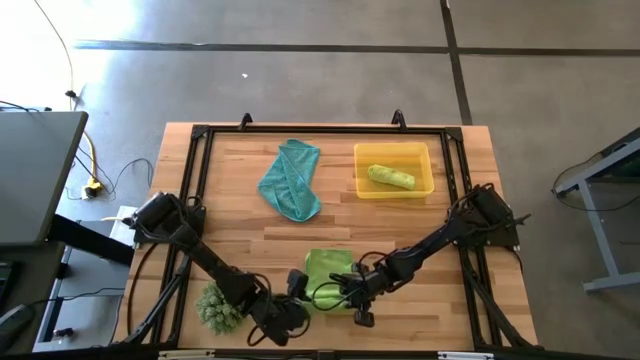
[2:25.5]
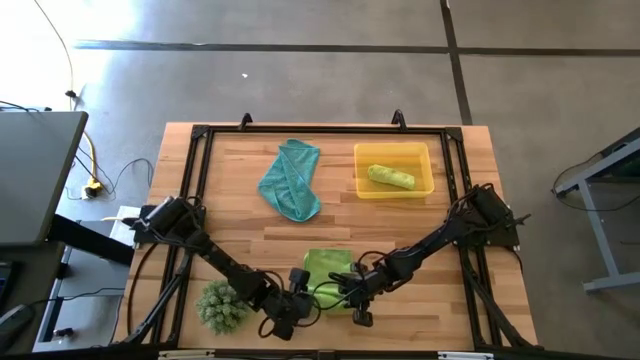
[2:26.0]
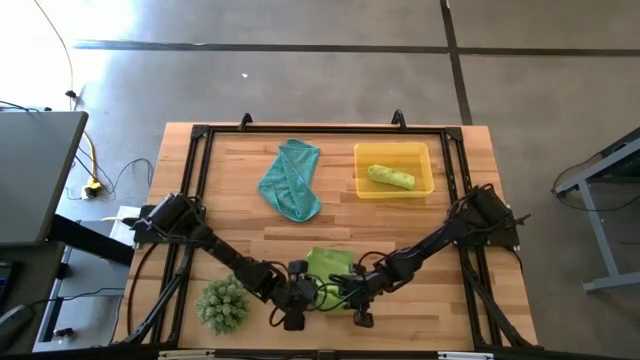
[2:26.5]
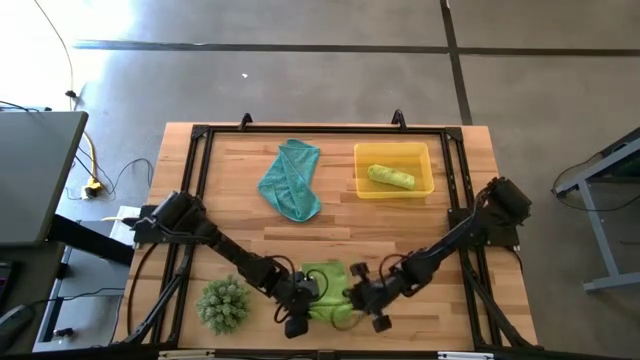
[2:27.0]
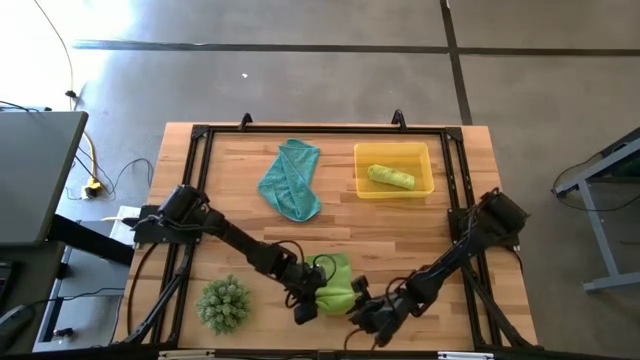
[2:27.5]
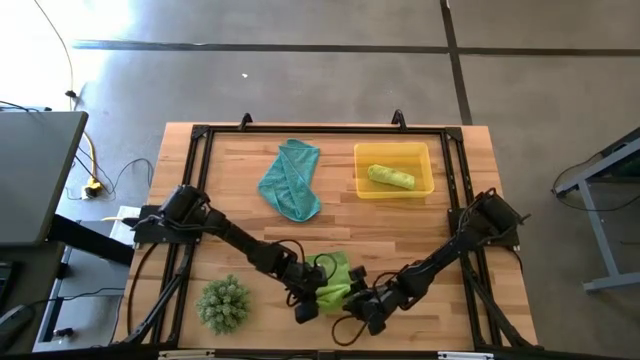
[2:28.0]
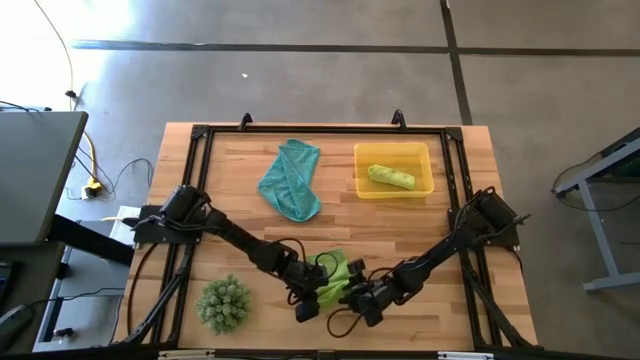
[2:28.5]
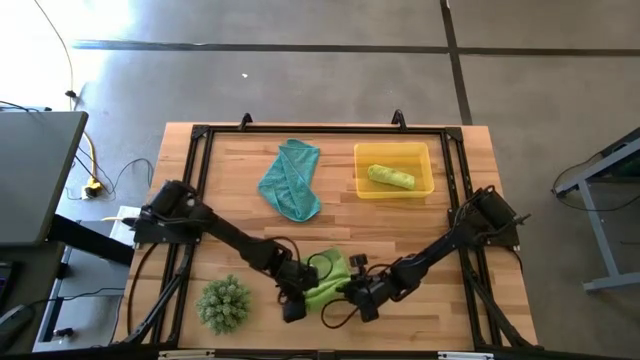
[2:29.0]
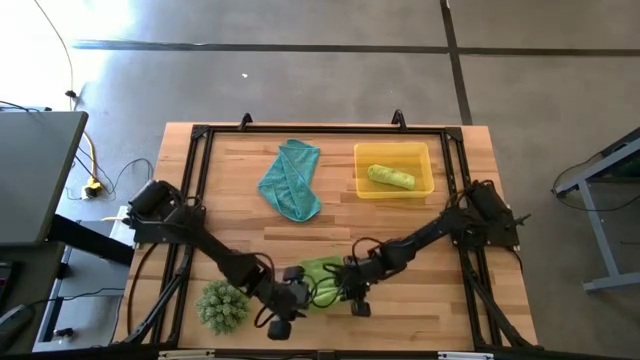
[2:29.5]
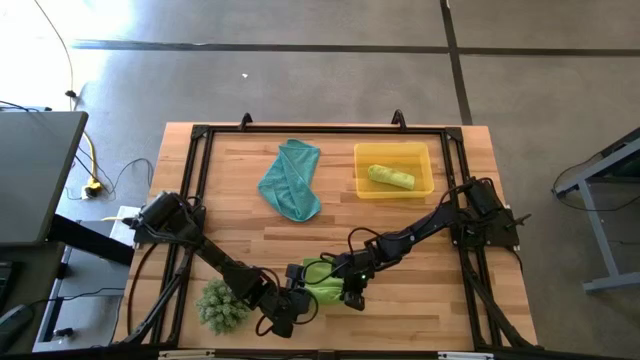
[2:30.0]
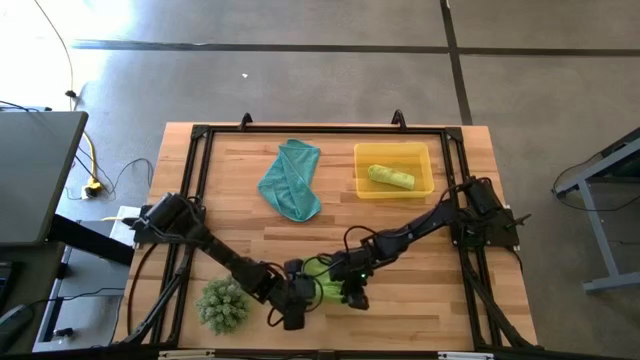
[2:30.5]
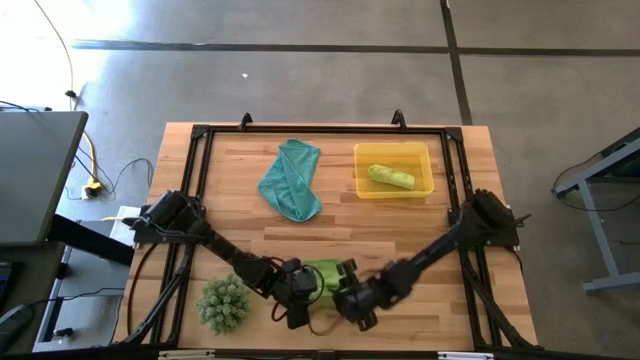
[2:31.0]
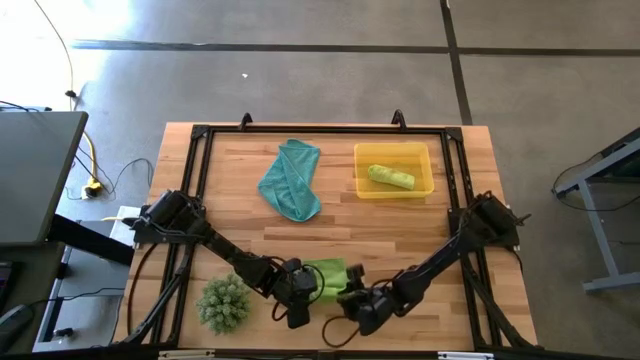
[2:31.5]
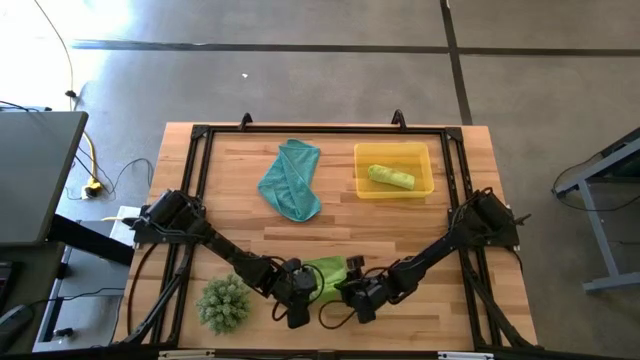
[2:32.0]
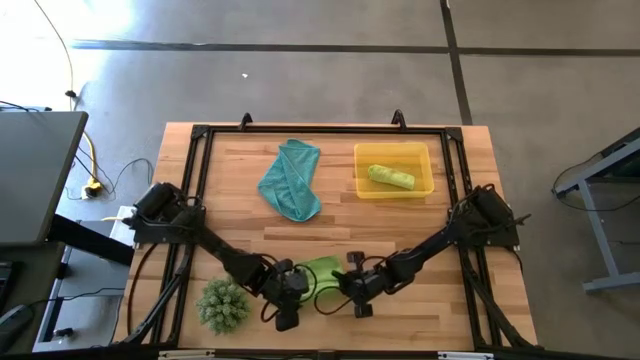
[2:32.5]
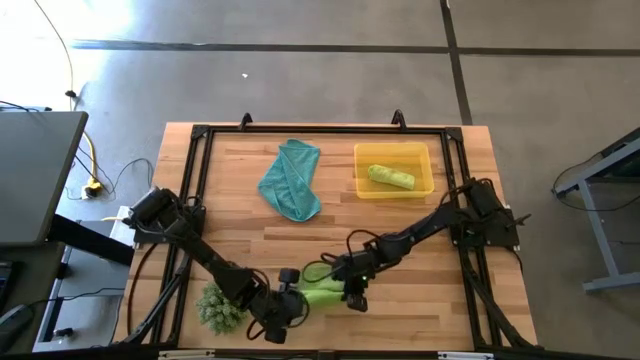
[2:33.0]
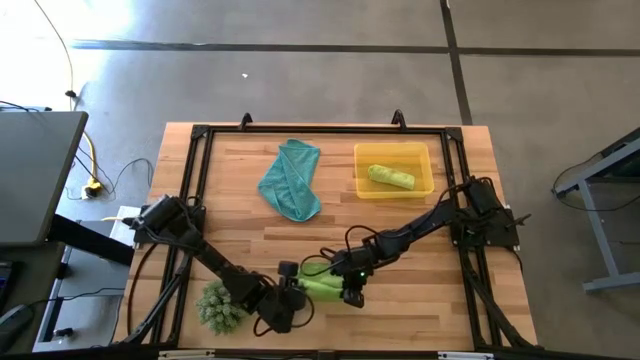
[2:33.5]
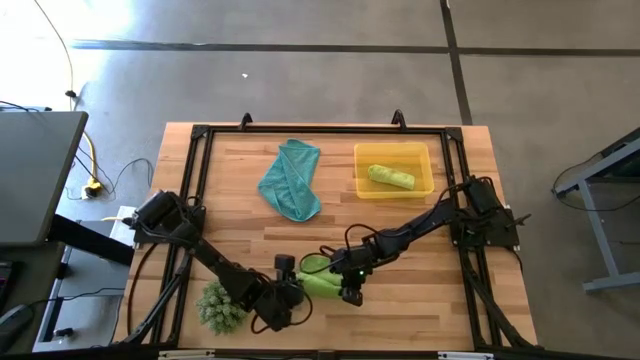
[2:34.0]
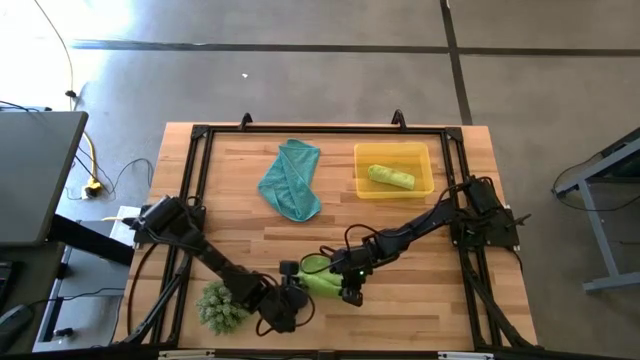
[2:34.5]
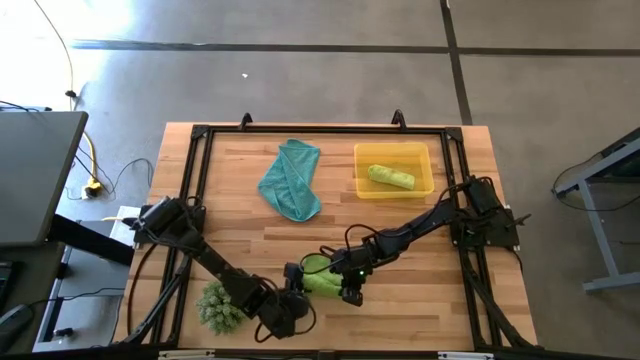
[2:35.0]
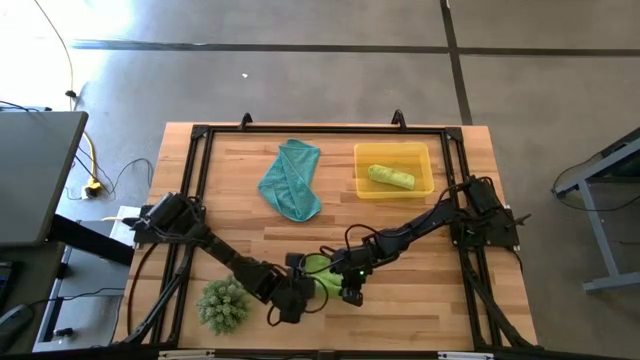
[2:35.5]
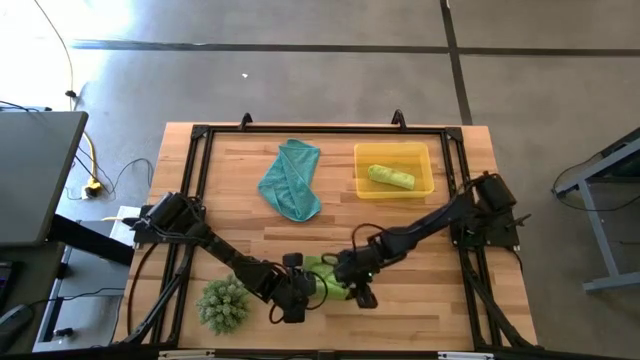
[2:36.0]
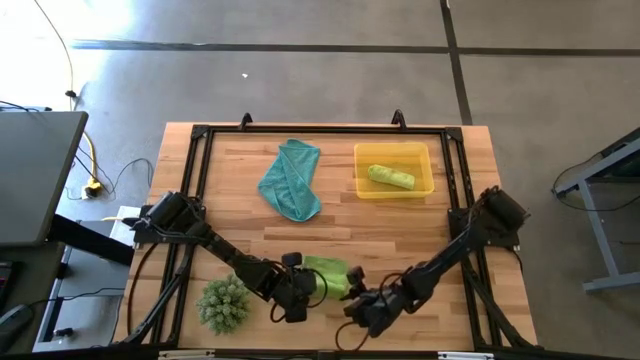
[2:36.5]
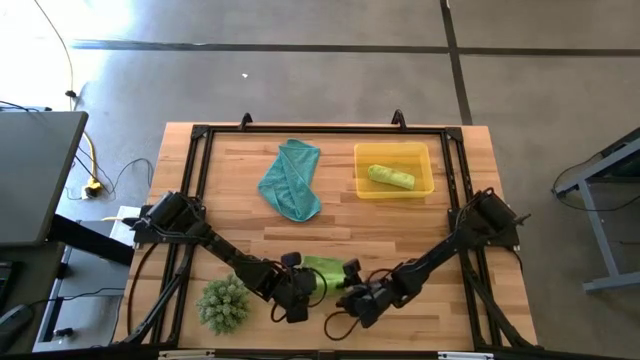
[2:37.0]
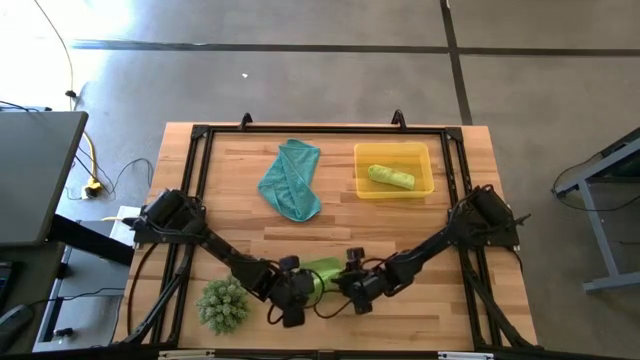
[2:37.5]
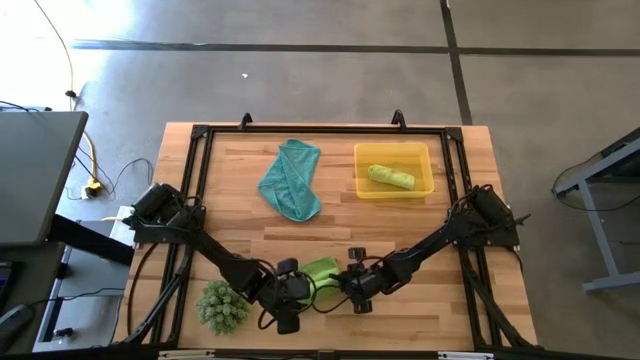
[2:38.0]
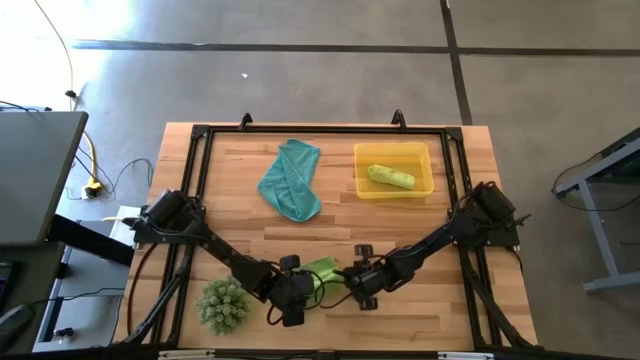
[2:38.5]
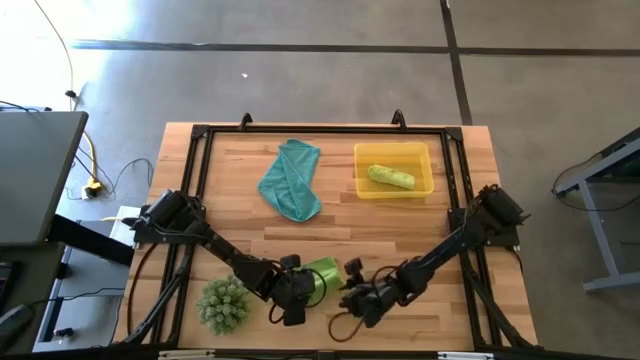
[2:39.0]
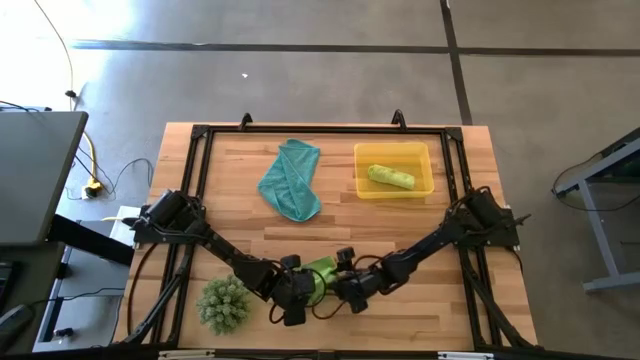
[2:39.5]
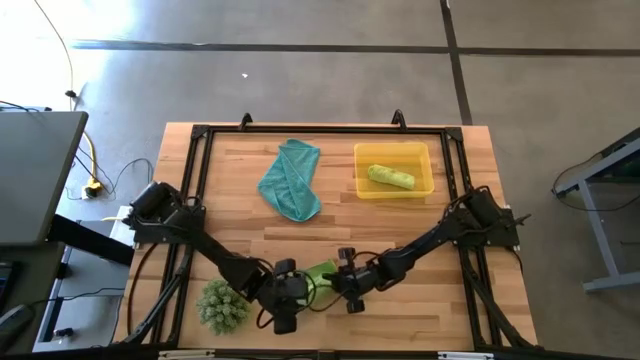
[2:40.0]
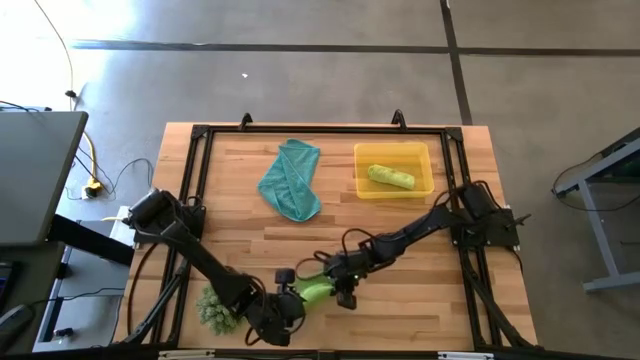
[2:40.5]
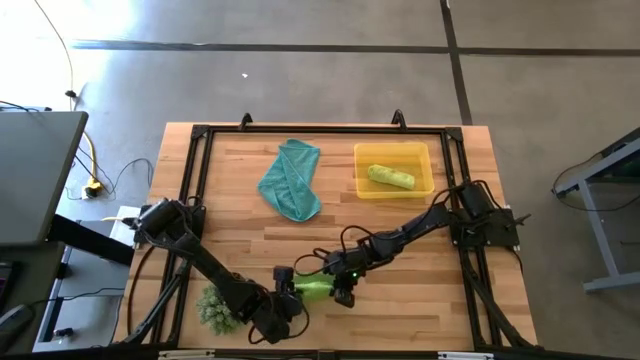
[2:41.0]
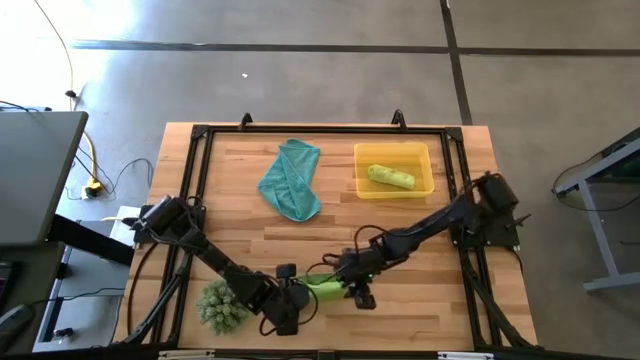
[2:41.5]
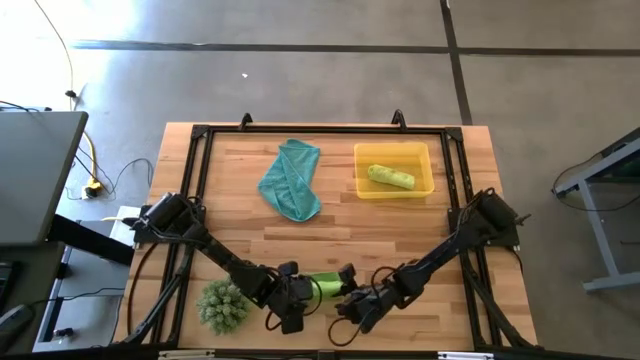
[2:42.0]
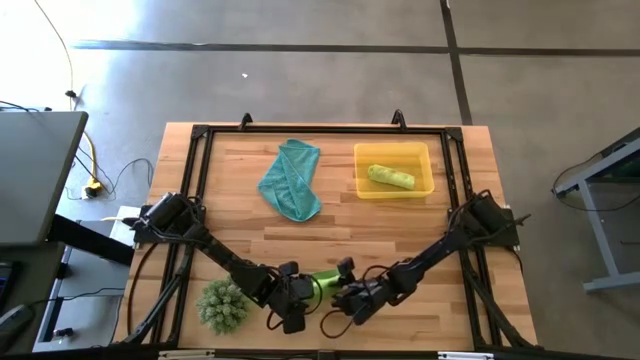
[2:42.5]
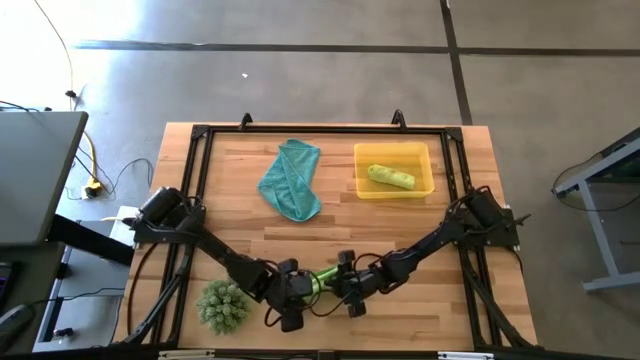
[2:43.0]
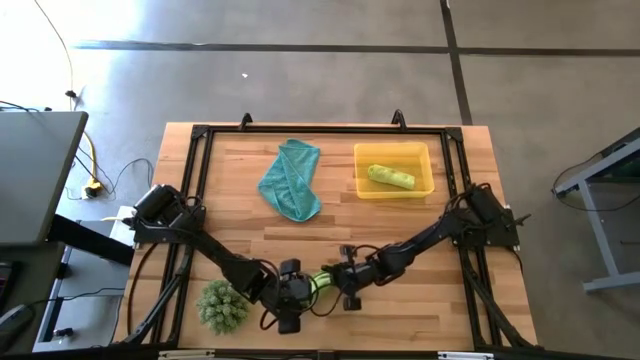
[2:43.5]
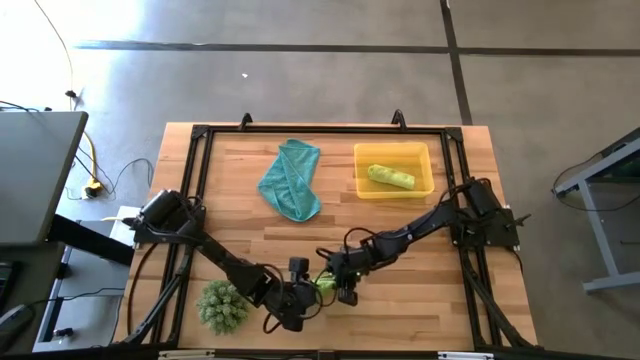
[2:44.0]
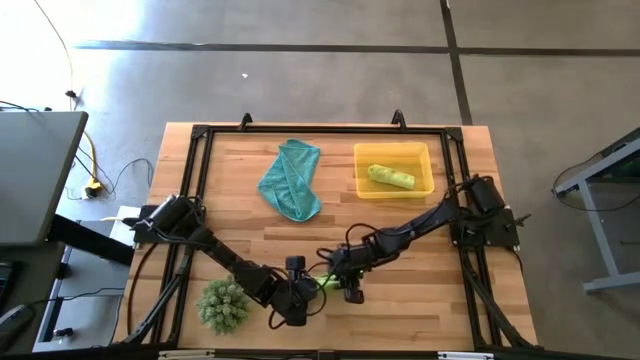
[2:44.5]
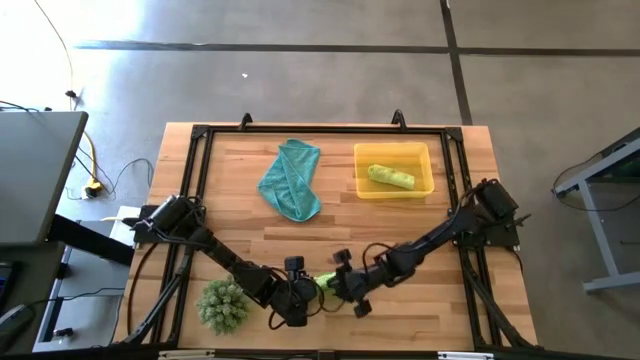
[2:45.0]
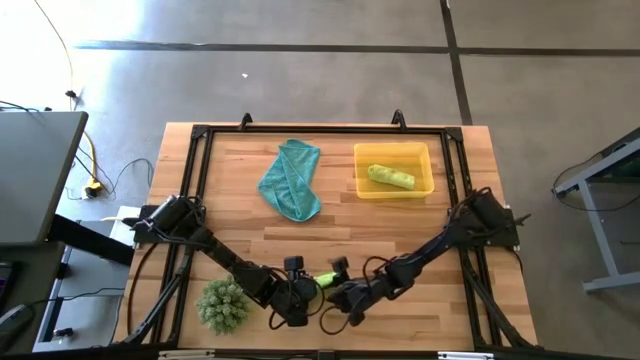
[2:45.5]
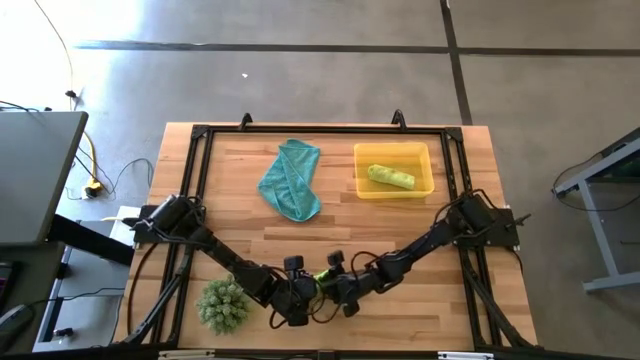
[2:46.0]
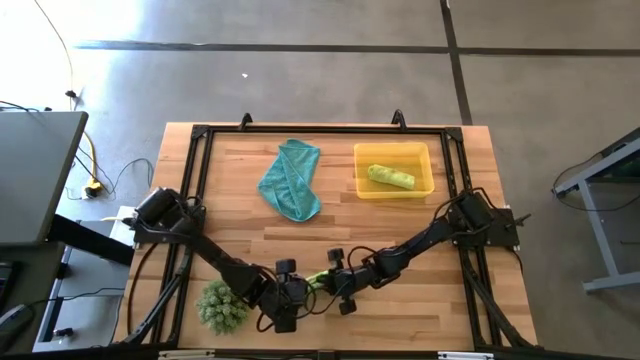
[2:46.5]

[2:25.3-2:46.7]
Task: Roll microfiber towels into tight, uniform cylinder then place into a basket
Roll the green towel

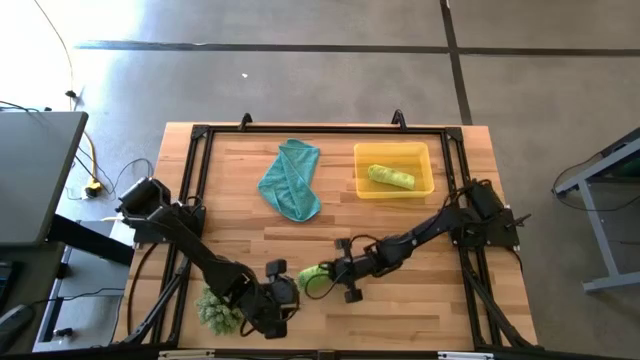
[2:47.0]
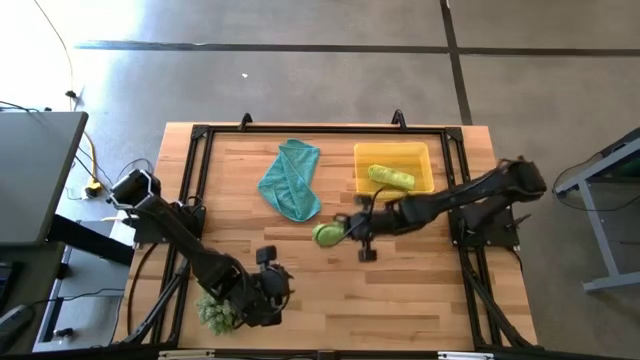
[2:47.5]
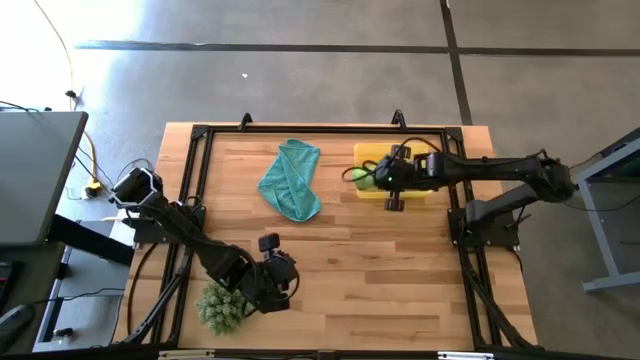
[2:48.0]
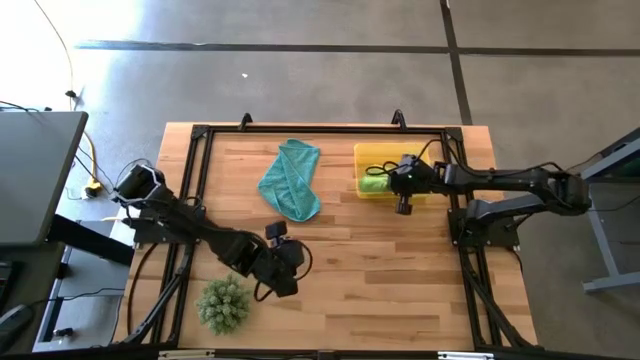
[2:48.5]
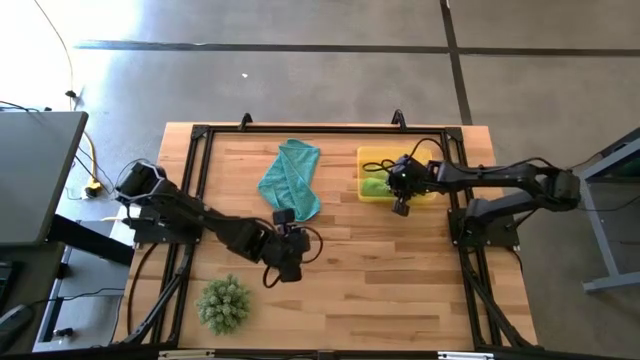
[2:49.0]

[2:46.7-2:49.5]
Put the green towel into the bin
